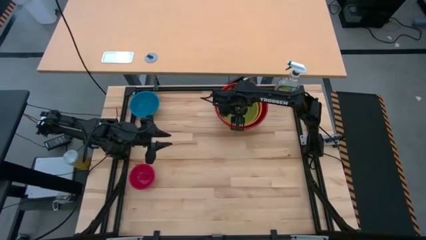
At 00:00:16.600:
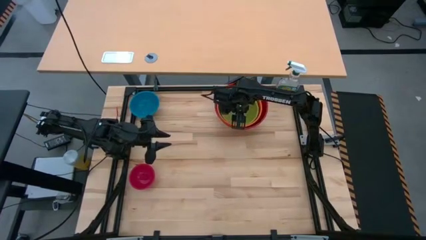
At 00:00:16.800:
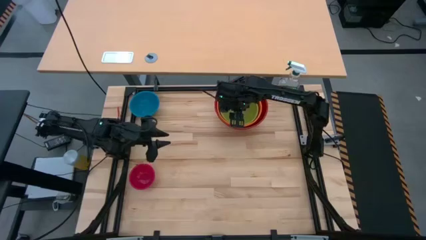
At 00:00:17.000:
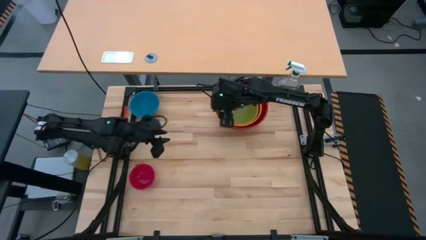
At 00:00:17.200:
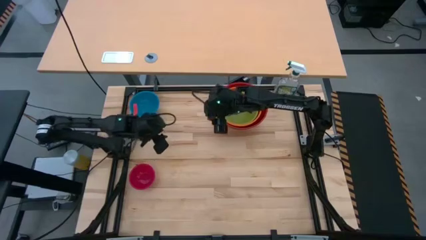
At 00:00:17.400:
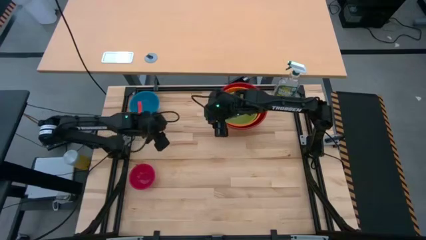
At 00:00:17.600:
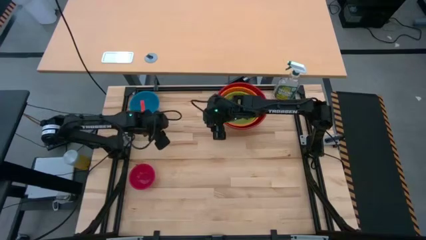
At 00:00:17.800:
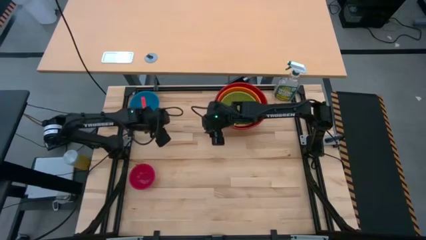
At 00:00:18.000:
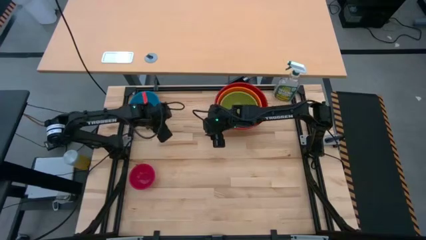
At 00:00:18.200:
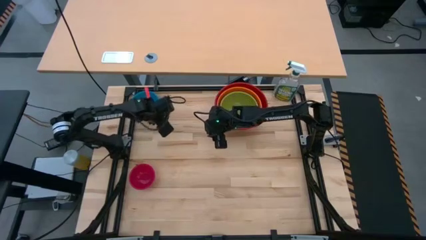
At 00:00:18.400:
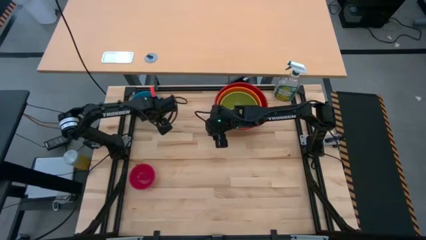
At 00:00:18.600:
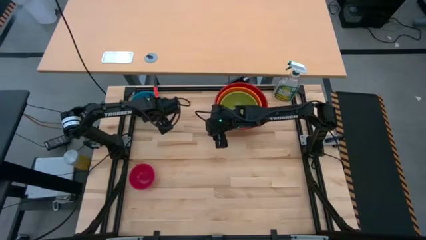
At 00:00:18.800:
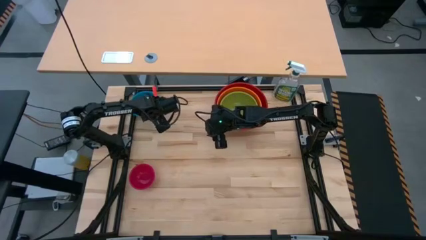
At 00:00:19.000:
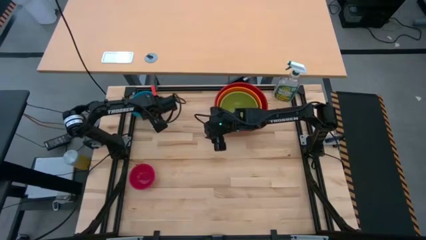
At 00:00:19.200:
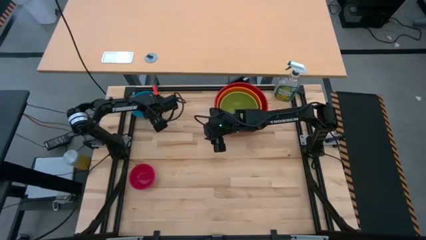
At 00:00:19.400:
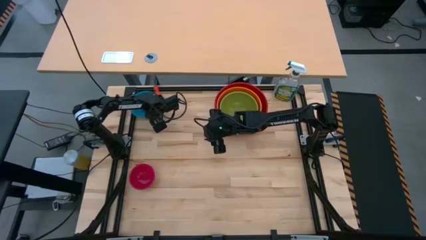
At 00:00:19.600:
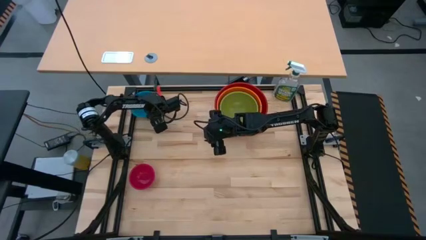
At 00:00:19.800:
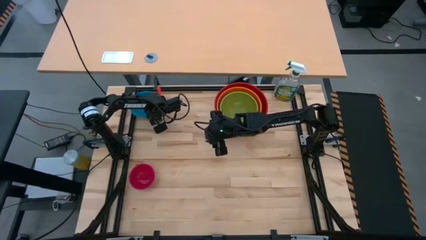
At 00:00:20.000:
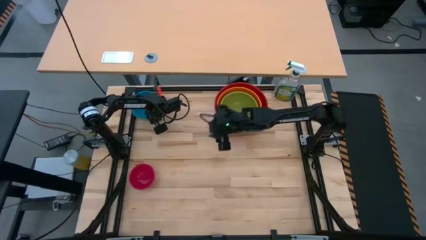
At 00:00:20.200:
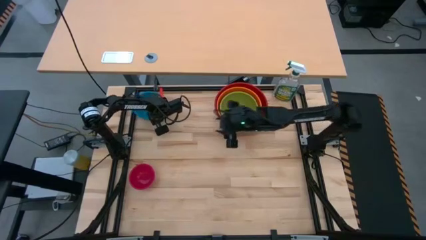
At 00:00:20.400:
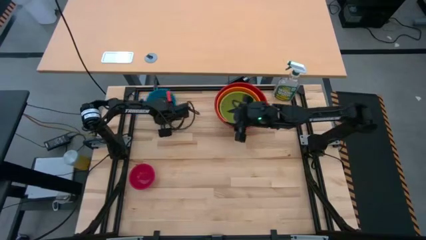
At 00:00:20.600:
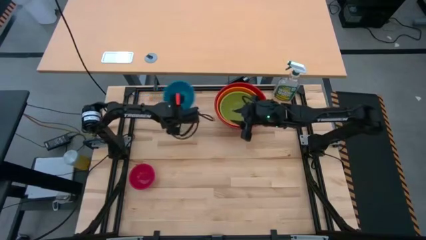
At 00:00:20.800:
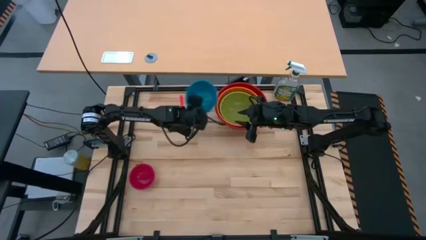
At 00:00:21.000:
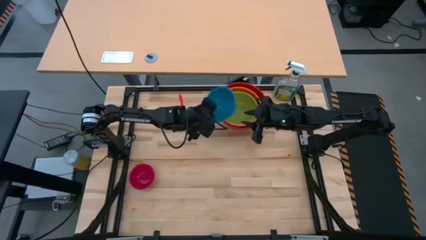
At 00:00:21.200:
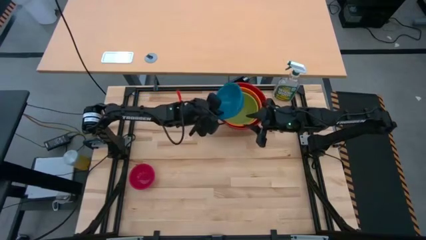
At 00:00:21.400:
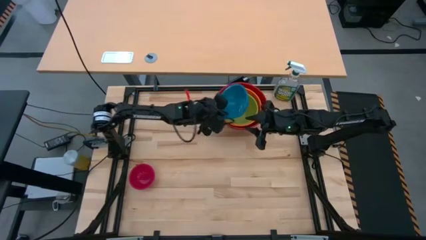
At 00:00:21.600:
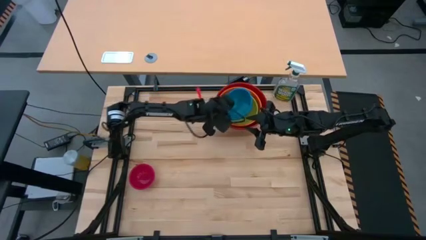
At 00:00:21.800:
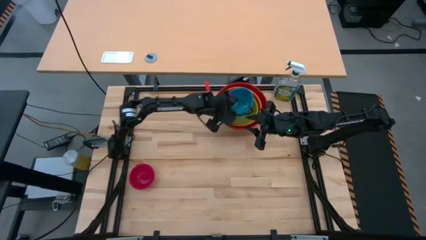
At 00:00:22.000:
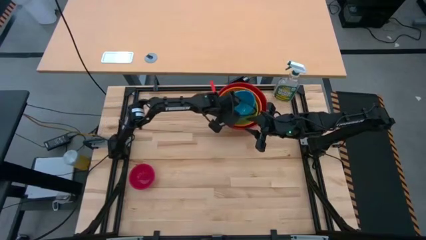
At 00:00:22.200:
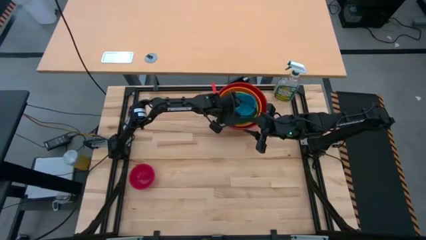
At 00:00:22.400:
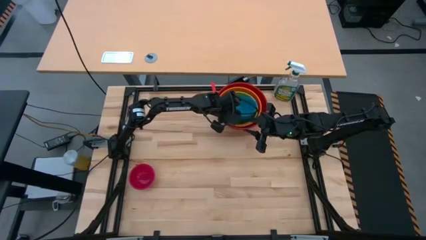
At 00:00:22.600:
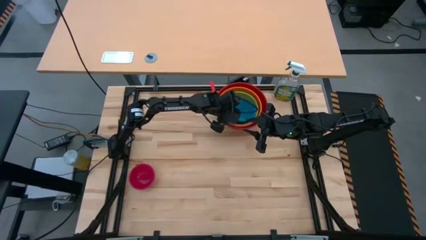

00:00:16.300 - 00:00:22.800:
Stack the blue bowl on top of the light green bowl

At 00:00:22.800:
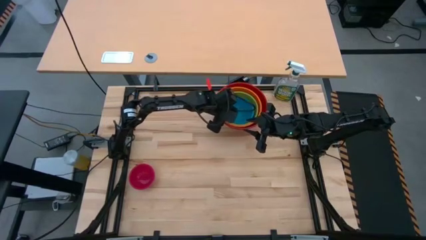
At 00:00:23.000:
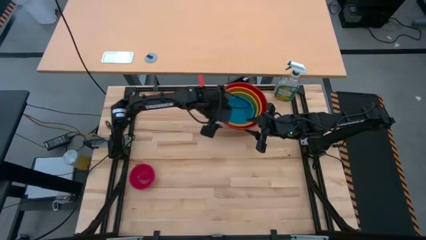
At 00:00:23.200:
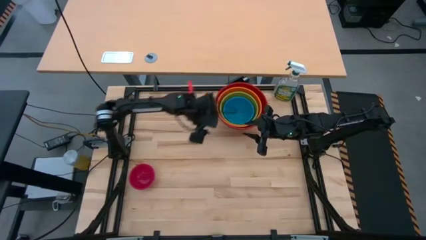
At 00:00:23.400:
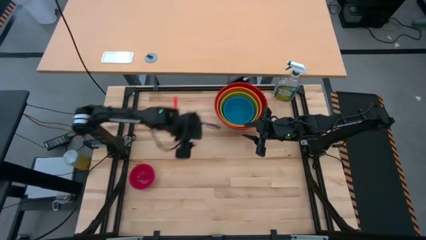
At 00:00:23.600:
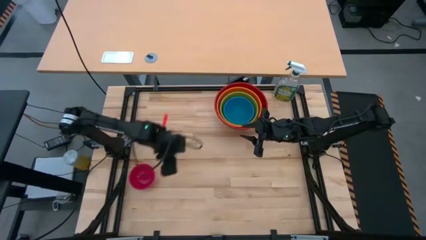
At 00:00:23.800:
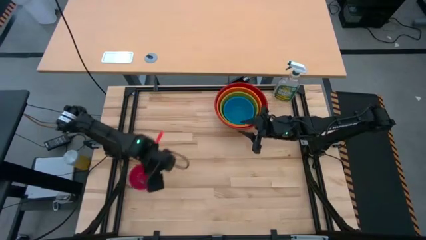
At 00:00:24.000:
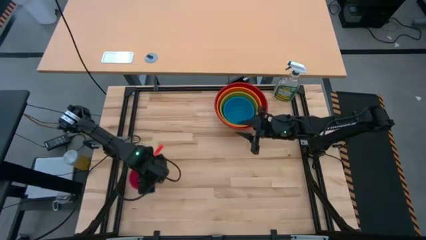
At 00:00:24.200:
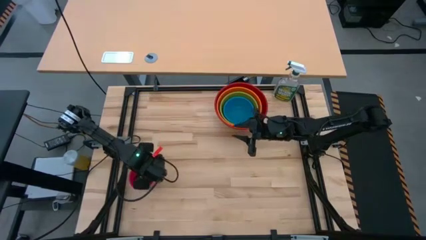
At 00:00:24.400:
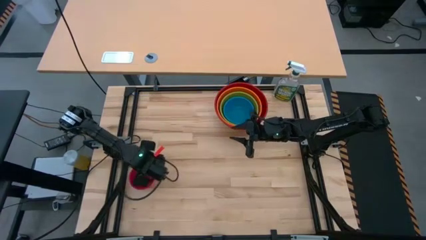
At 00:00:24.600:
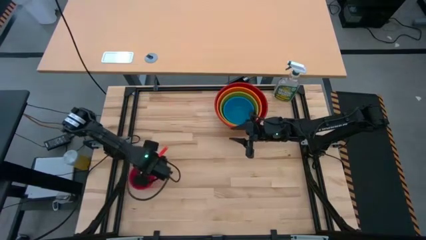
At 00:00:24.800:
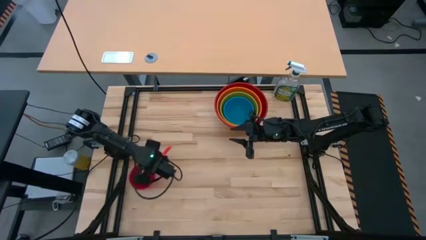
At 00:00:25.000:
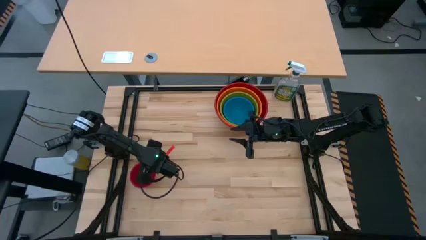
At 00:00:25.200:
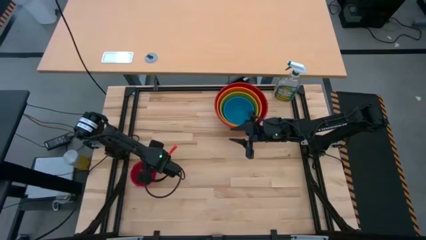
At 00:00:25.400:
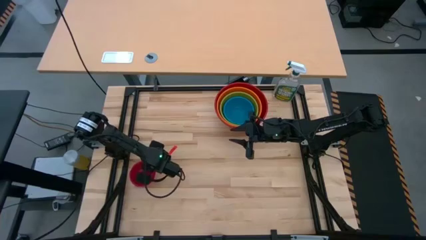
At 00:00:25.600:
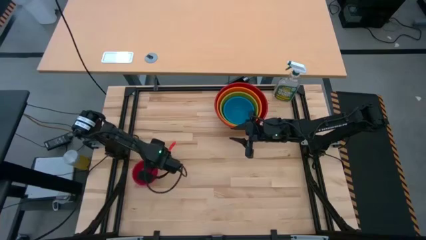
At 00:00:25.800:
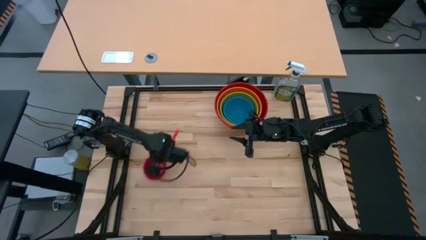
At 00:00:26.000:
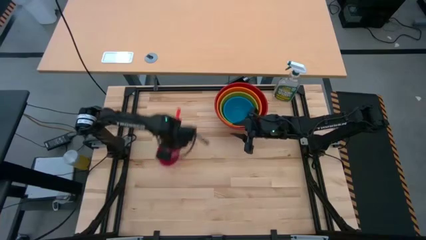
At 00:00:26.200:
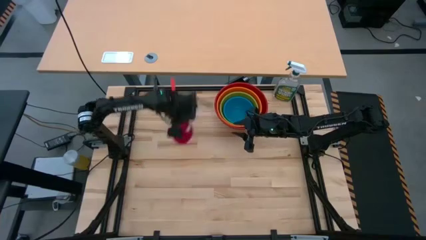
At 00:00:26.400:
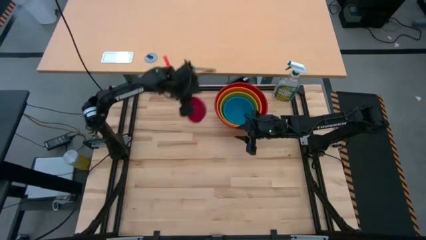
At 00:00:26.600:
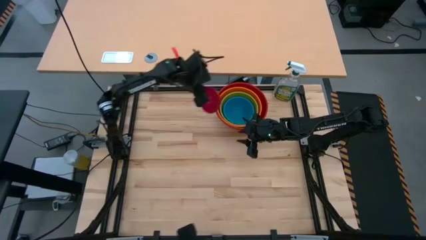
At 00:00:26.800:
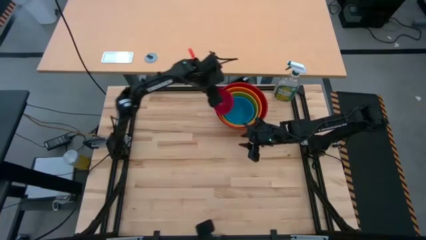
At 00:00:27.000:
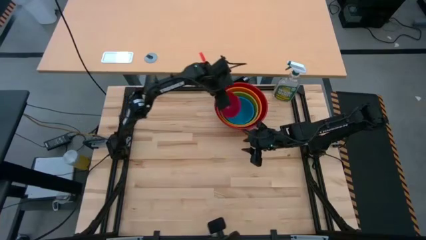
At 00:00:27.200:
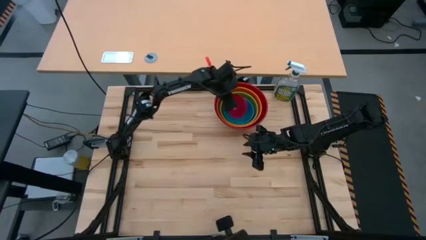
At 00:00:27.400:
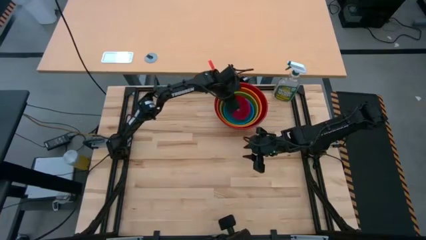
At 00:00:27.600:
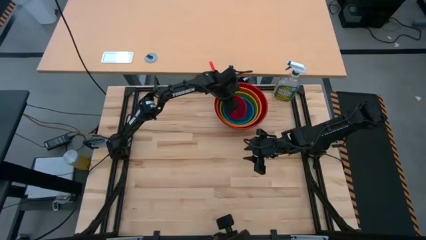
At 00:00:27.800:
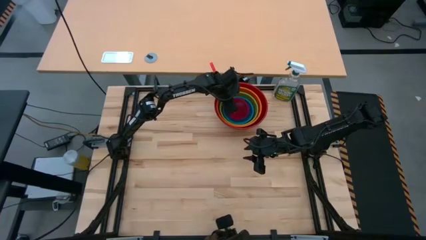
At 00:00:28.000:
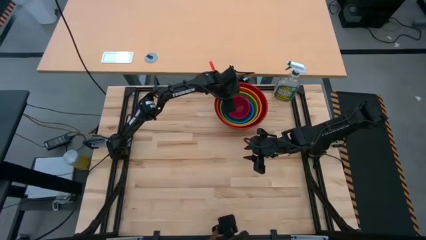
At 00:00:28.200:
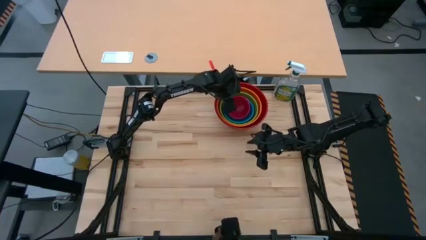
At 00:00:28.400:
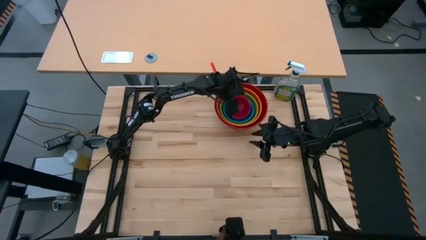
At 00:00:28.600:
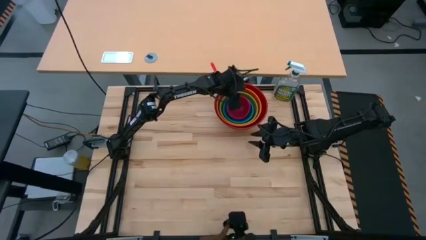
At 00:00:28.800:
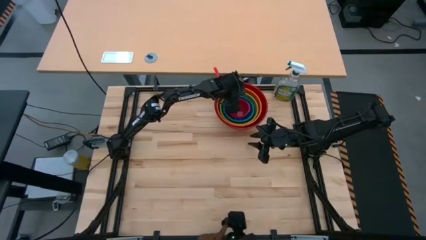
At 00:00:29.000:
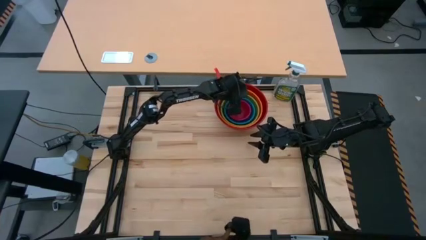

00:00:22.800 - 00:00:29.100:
Stack the pink bowl on top of the blue bowl

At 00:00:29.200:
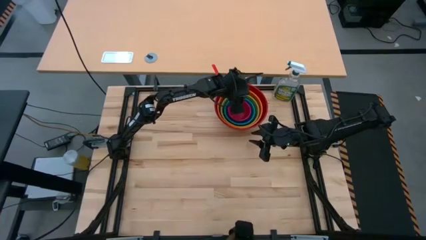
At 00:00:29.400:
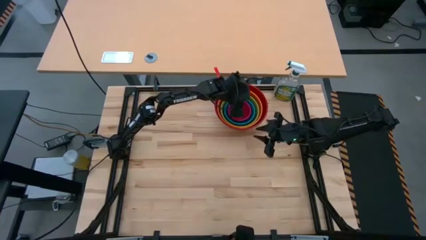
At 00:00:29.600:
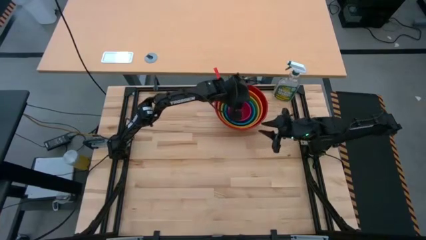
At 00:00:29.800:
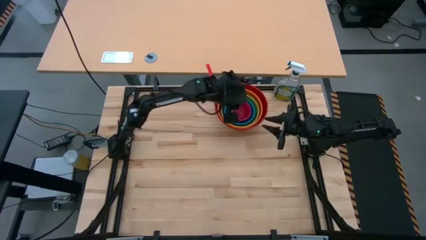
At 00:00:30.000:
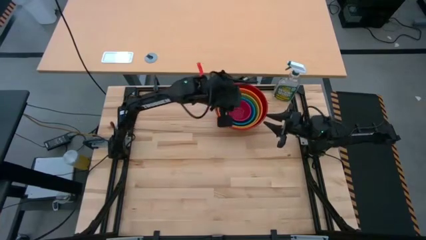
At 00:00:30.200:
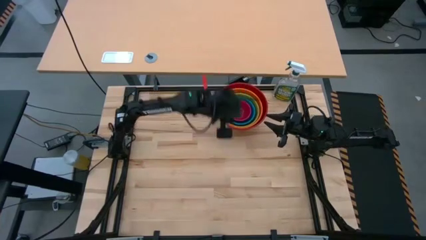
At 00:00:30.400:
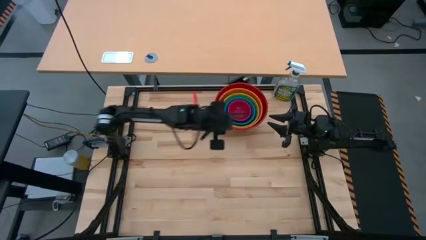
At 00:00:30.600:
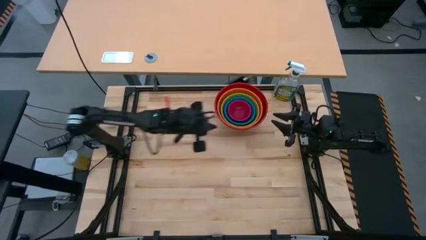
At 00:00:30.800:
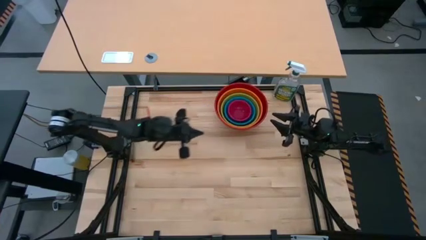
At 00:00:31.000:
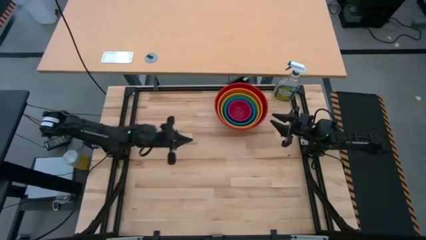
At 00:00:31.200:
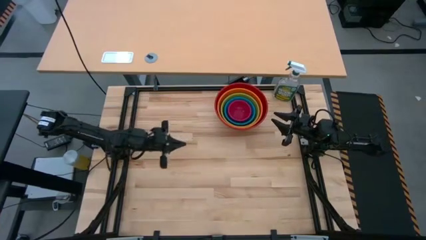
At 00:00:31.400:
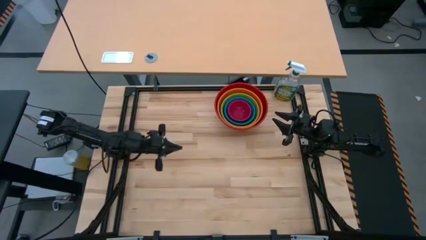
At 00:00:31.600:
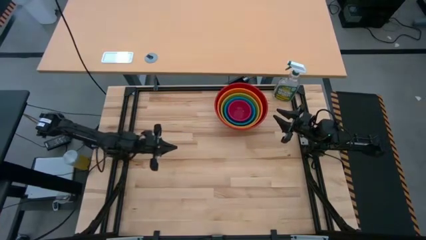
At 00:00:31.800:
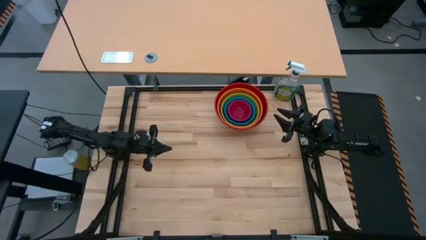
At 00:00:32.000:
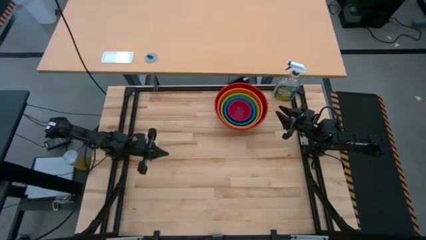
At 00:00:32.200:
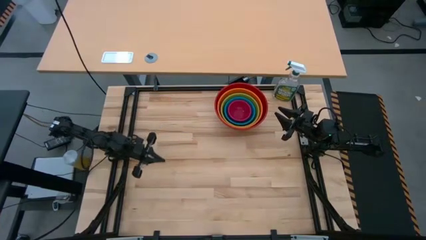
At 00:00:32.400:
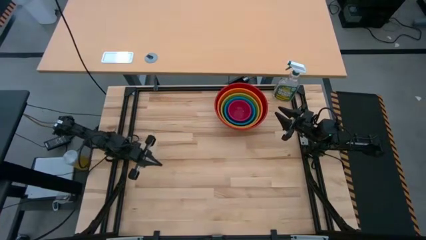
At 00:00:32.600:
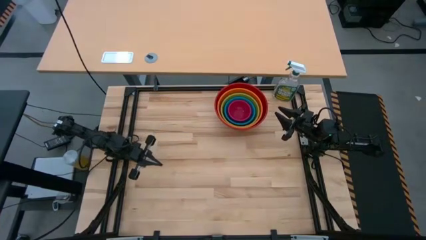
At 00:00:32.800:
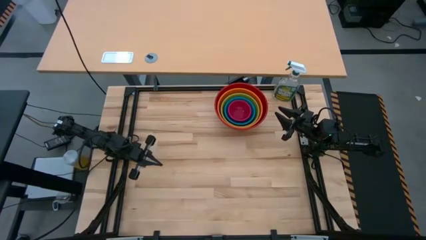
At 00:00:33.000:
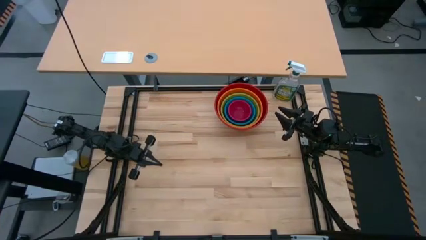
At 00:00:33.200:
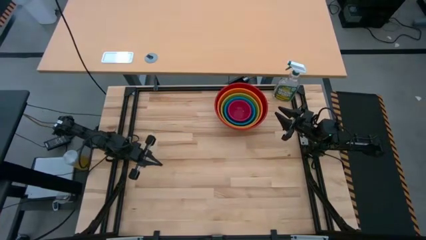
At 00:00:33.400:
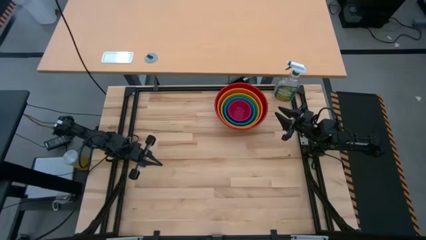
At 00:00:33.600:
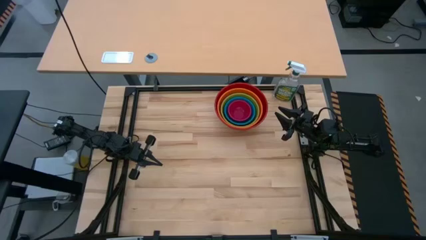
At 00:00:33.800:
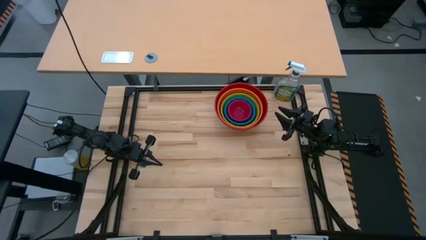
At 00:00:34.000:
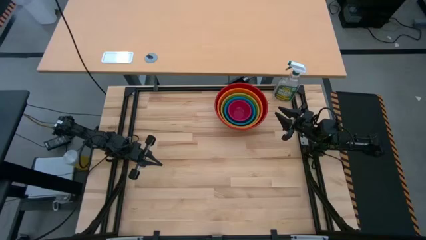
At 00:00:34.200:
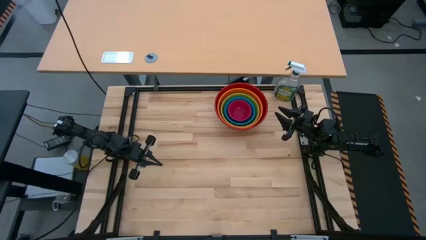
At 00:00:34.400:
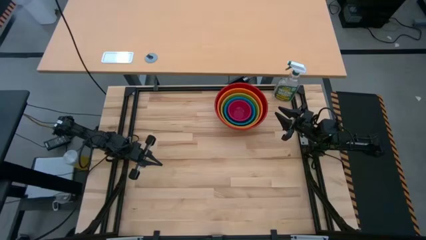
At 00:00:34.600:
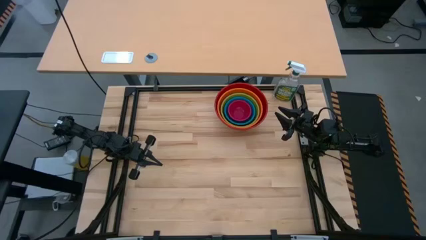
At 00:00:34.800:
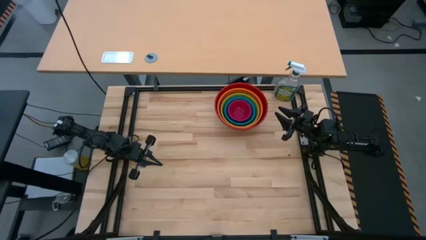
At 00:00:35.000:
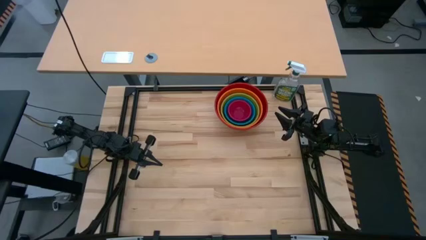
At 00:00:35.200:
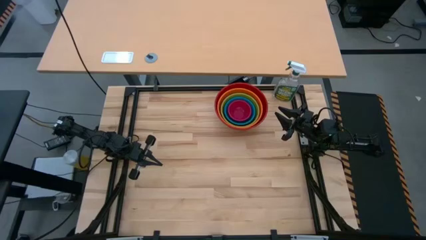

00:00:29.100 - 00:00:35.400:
Return to Home Position
